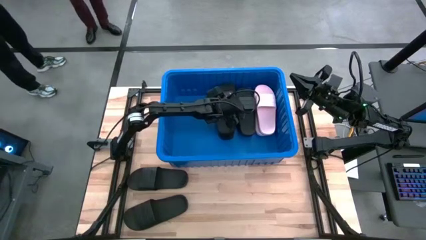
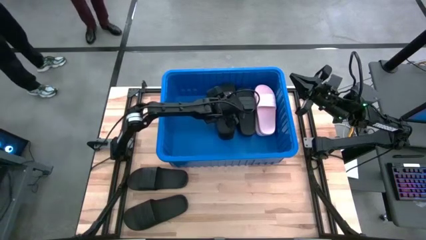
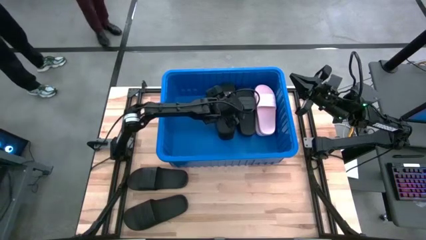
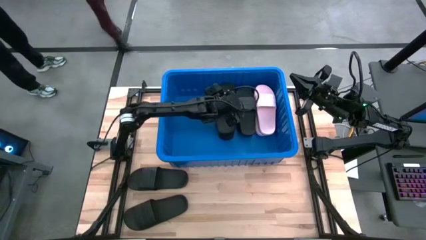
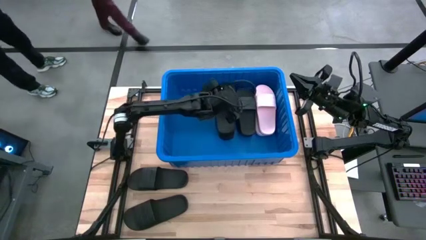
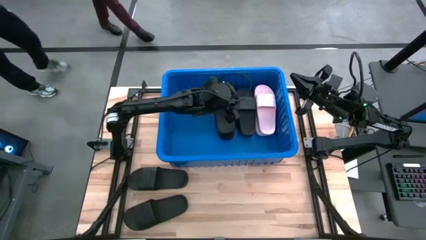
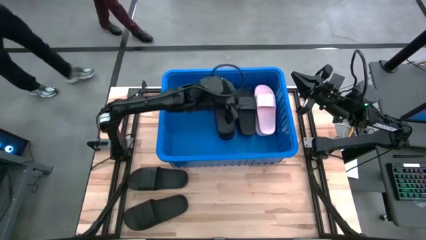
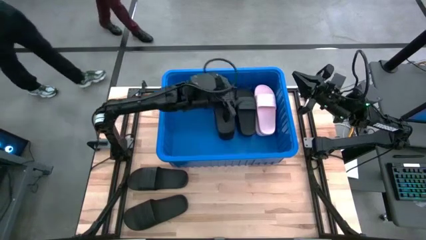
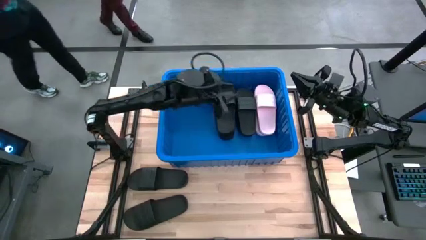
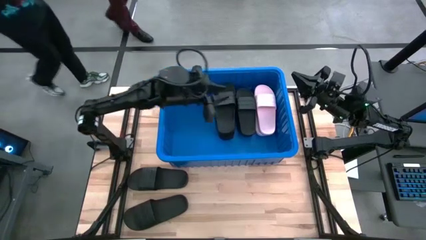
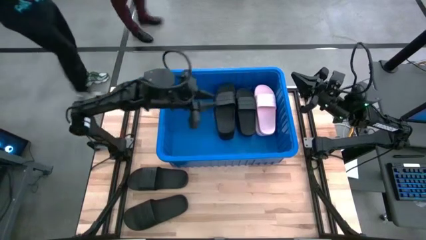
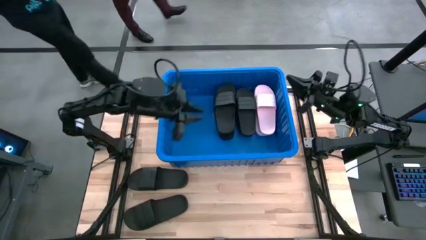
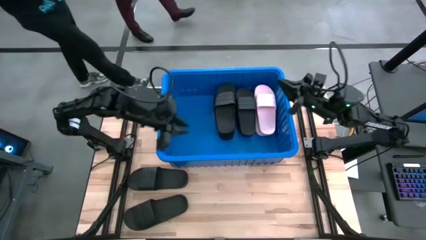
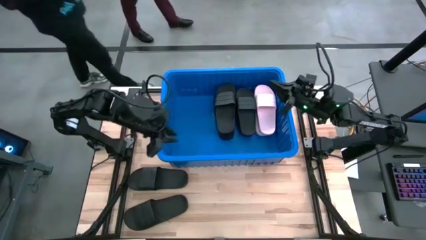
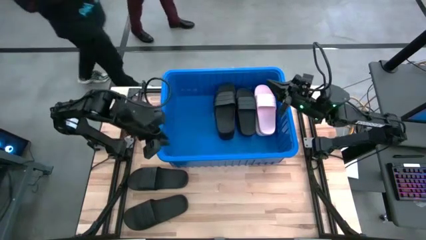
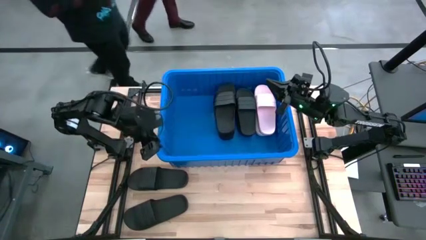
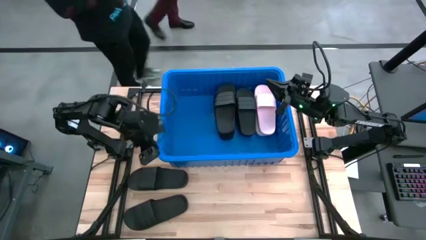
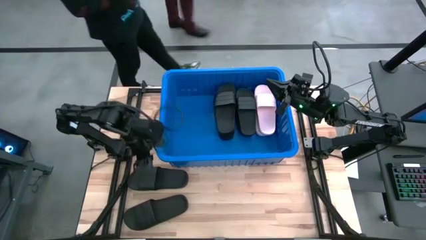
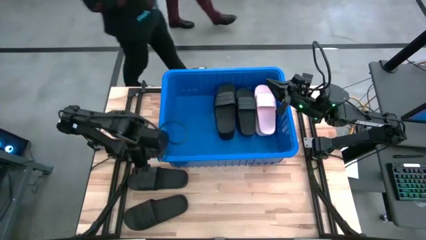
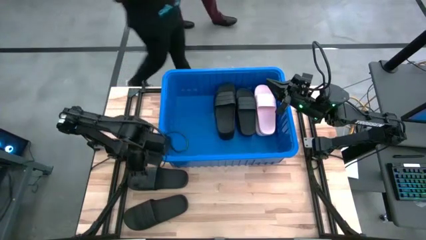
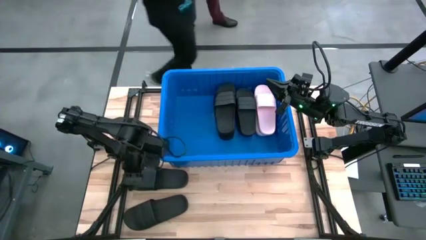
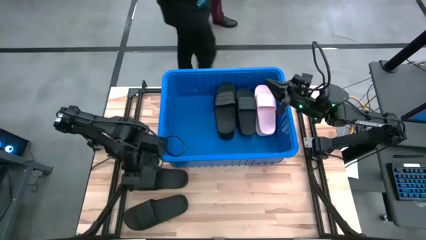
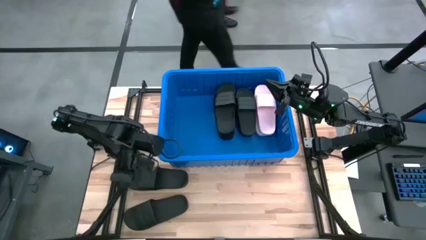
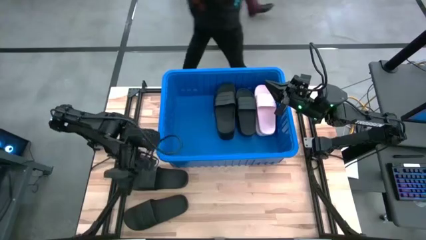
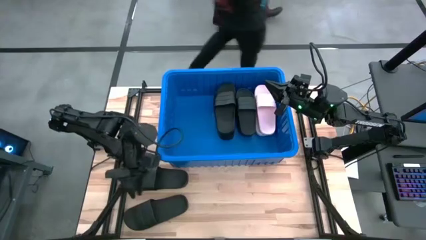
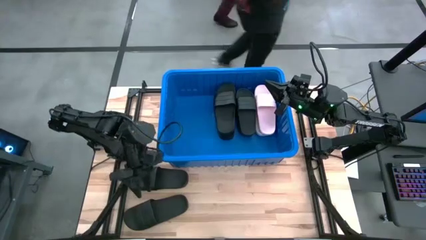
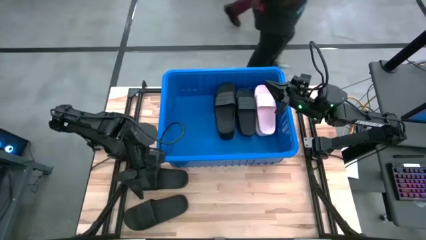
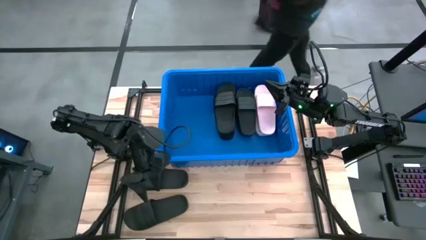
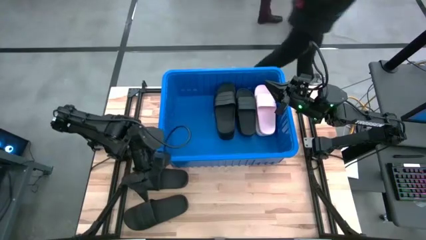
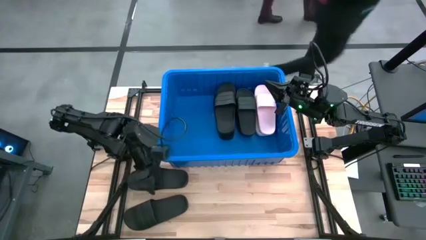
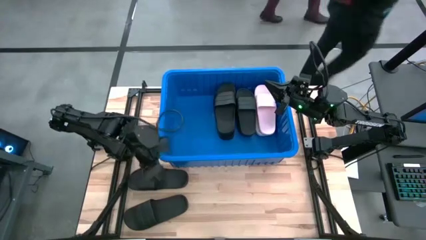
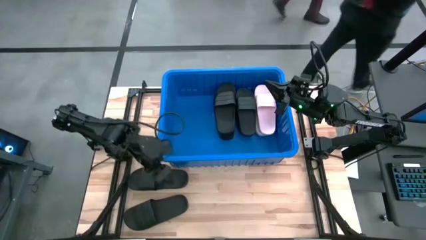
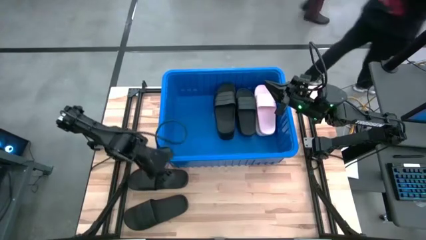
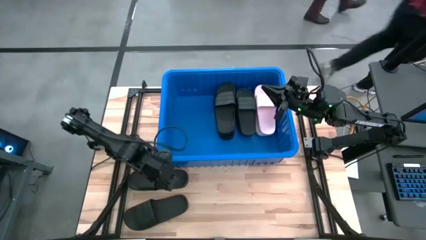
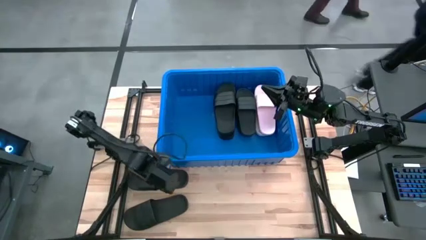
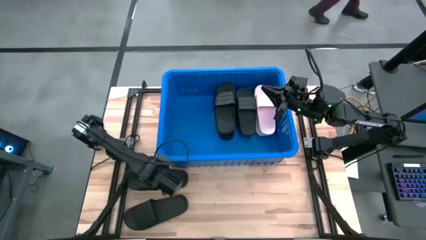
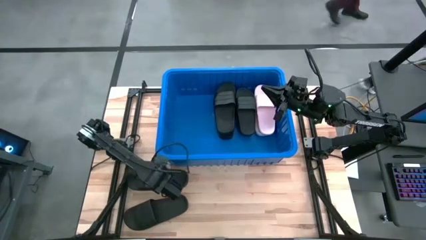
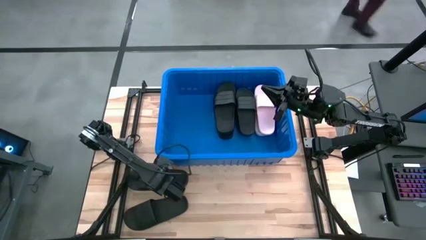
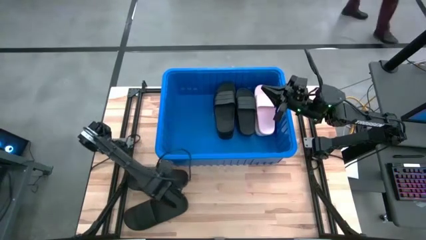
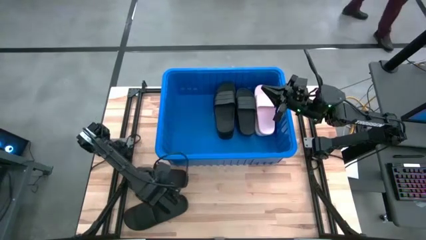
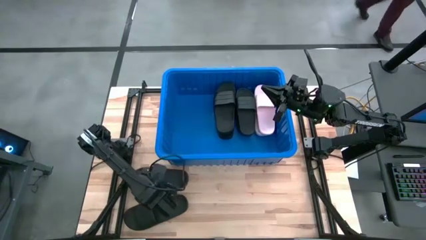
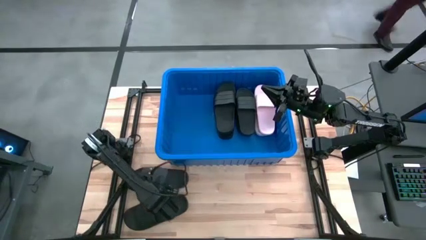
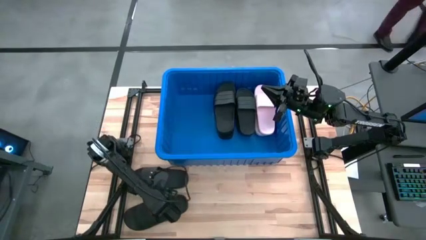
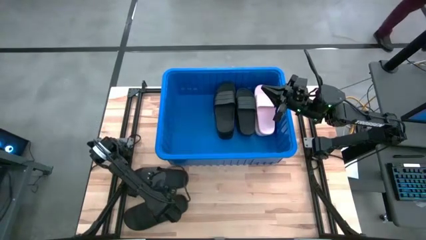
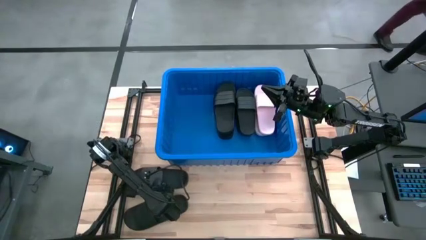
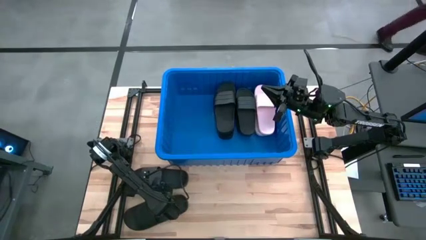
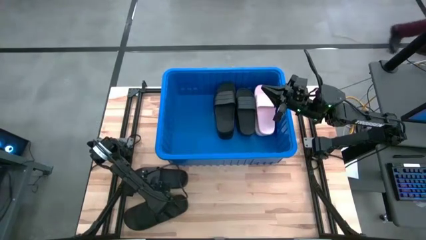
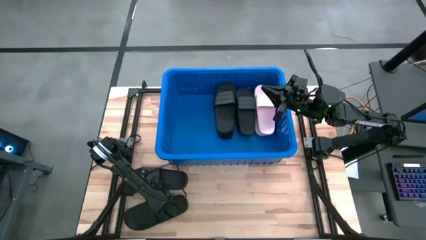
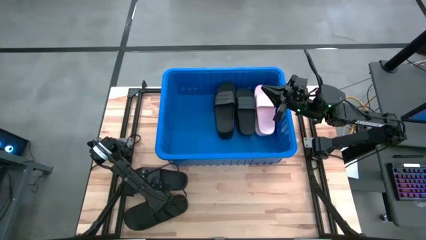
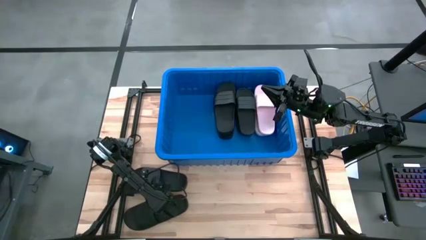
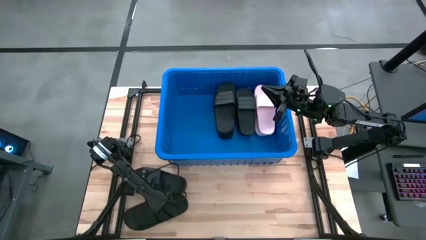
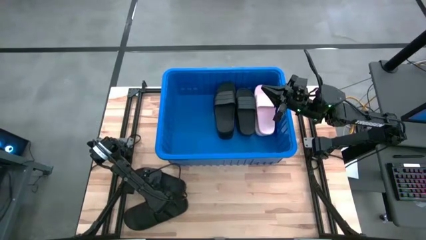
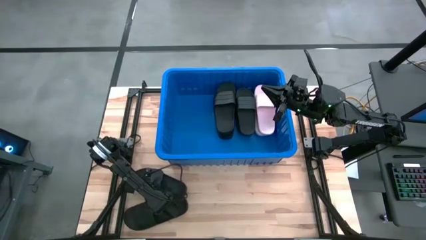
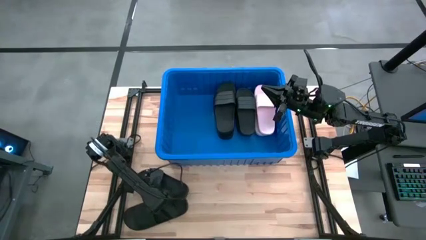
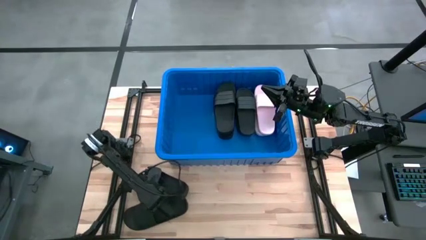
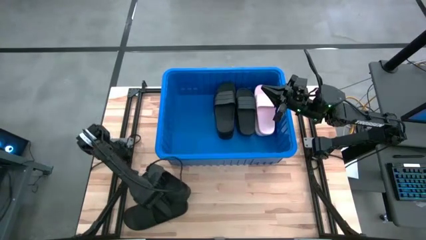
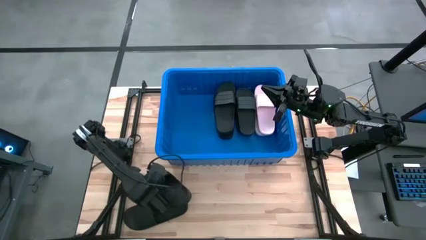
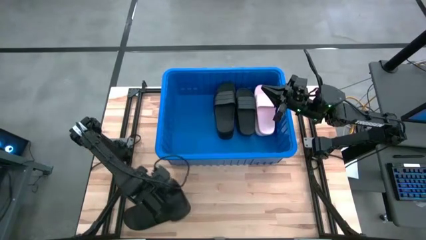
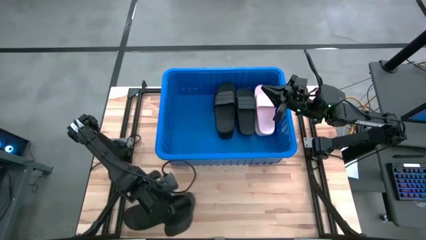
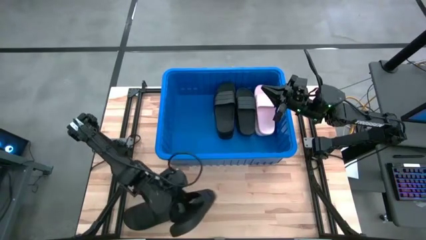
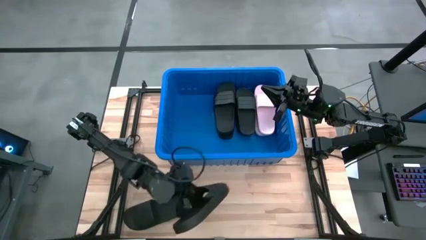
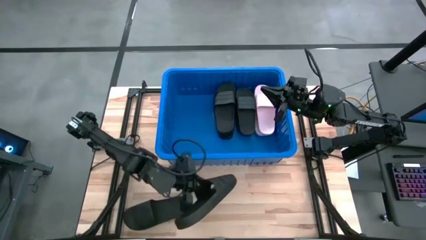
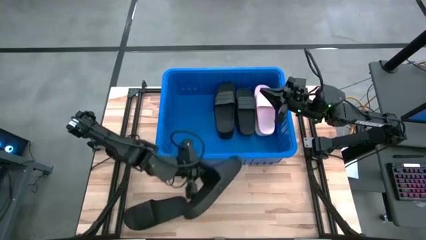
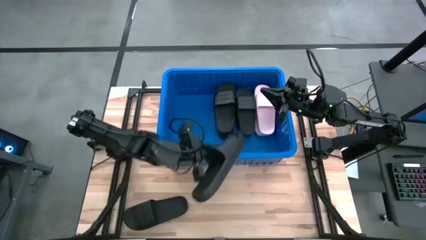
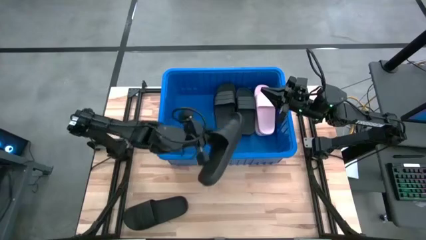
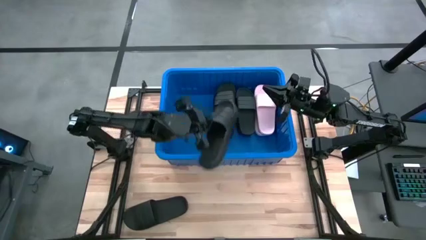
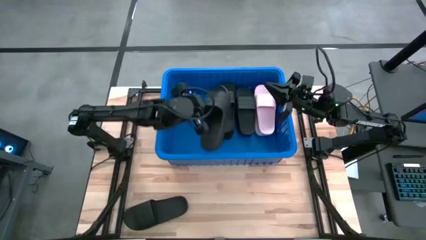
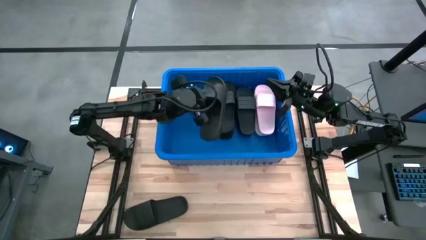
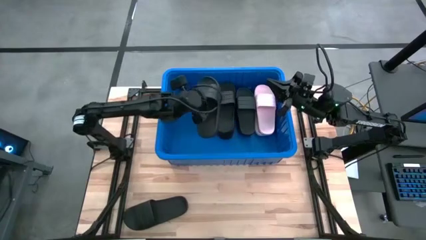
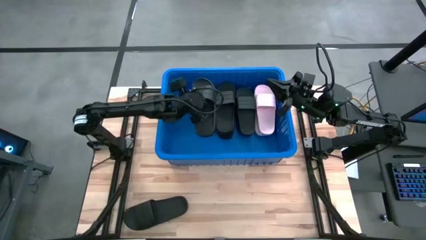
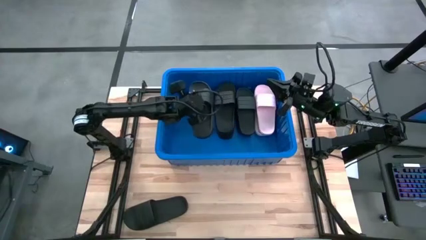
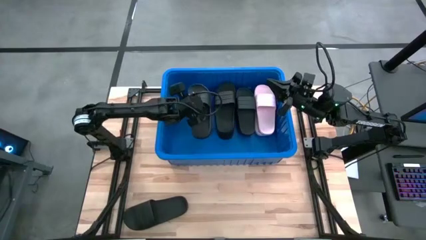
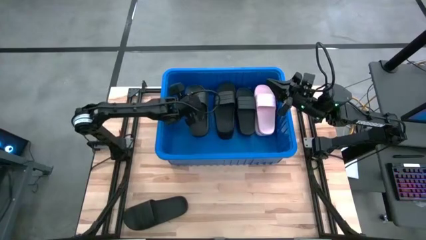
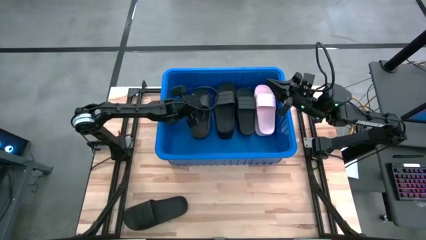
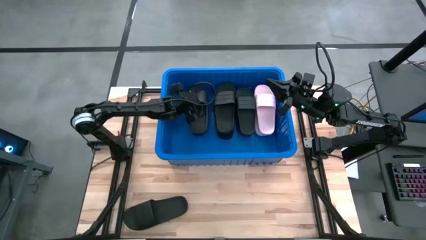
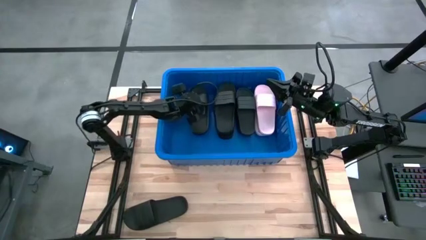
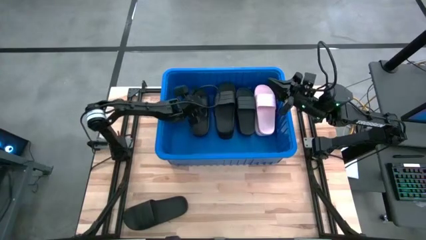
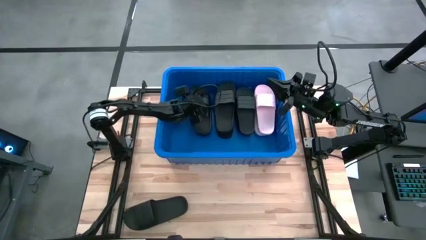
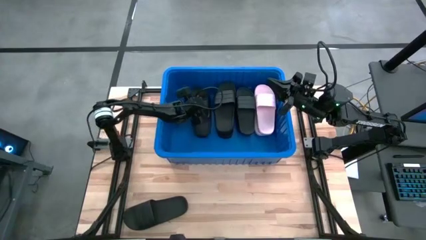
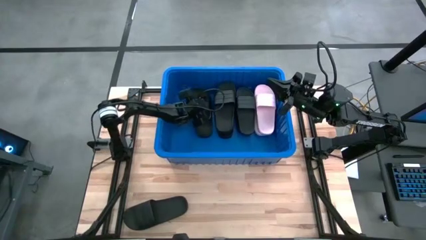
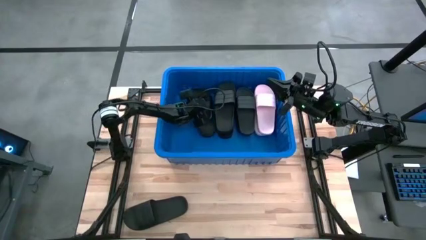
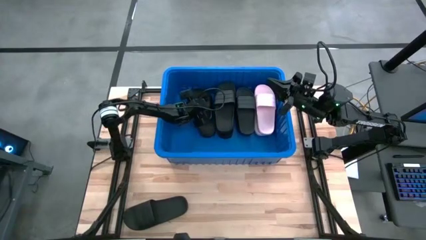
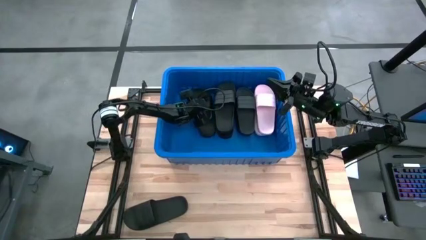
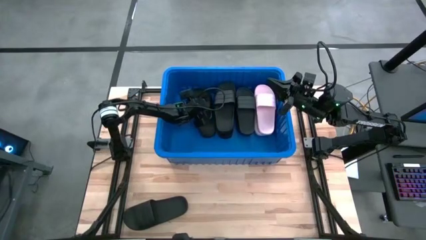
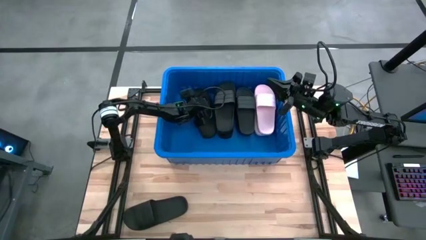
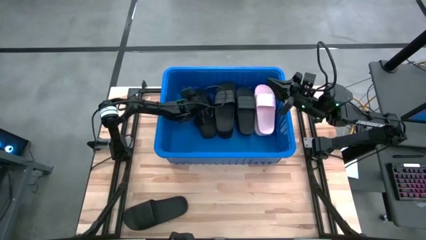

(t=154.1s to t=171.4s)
Task: Pick and place slides into bin
Put the black slide into the blue bin
